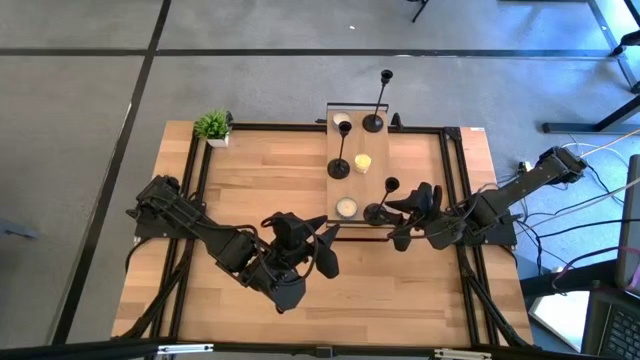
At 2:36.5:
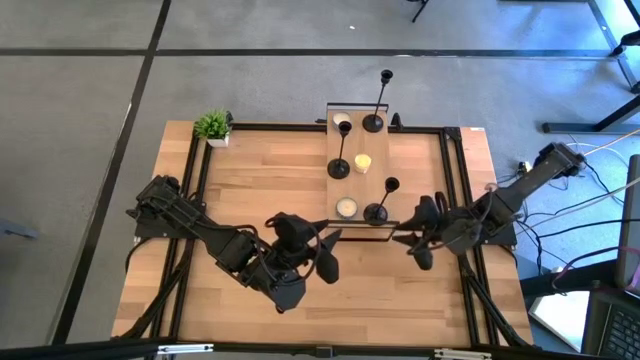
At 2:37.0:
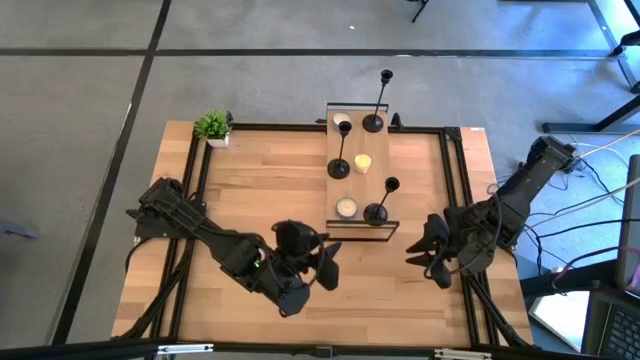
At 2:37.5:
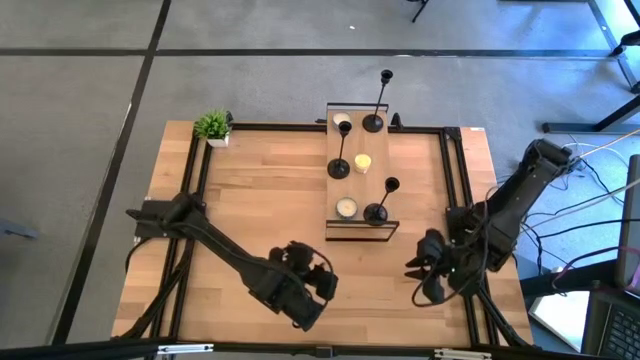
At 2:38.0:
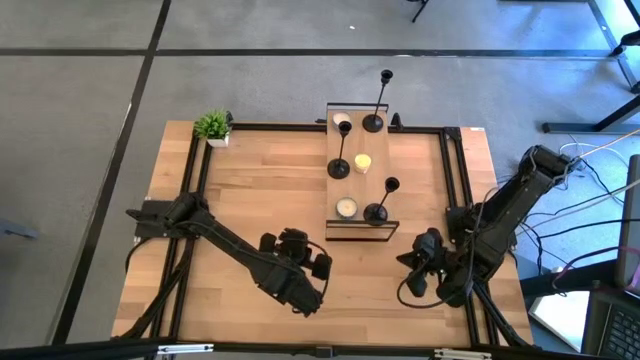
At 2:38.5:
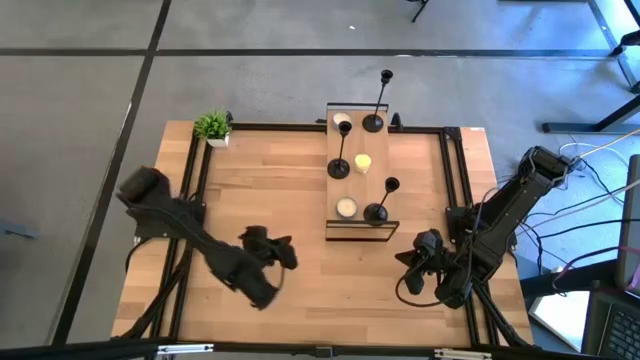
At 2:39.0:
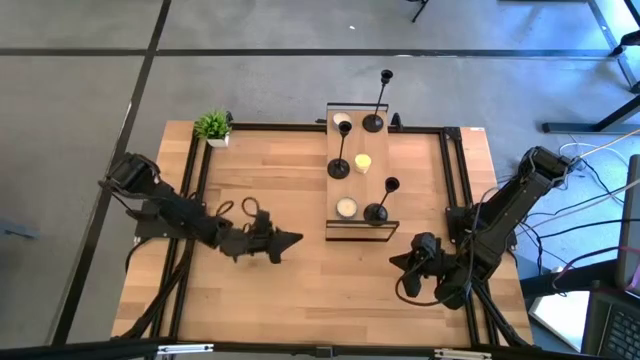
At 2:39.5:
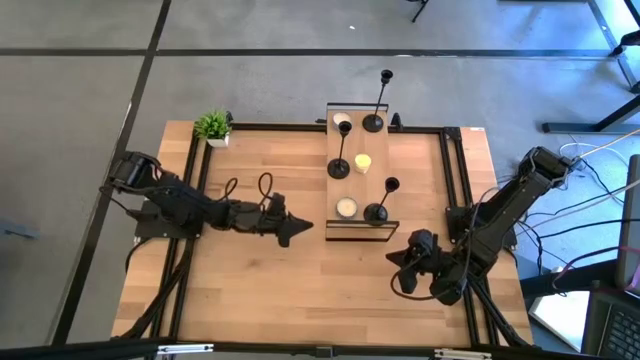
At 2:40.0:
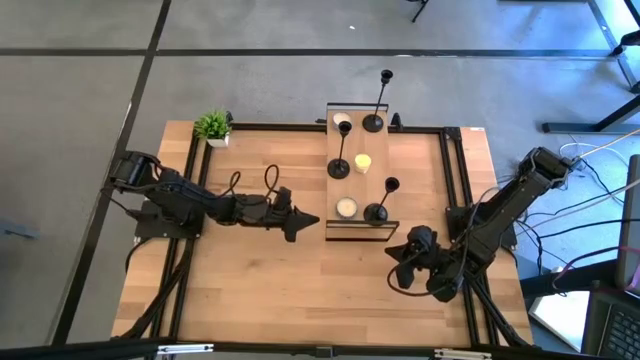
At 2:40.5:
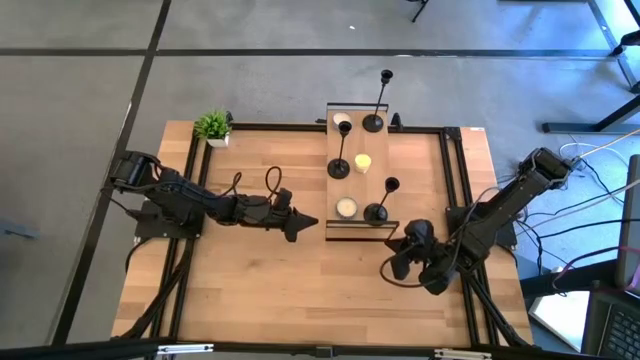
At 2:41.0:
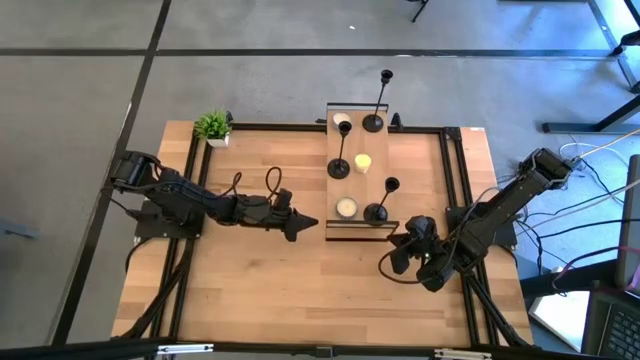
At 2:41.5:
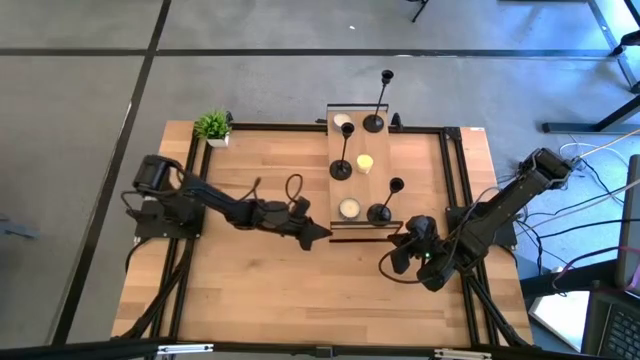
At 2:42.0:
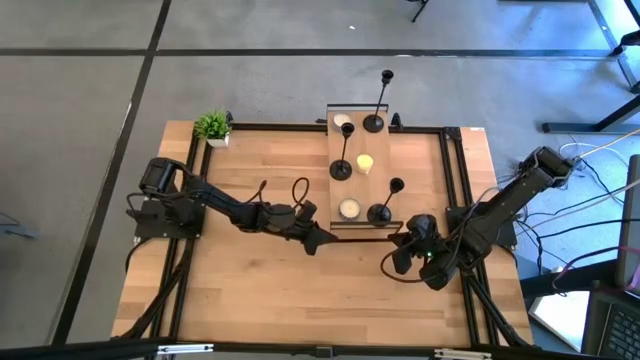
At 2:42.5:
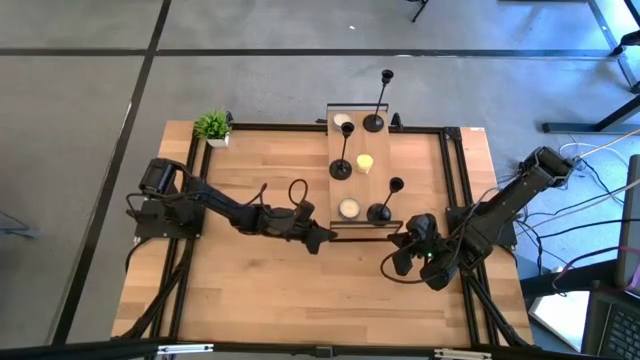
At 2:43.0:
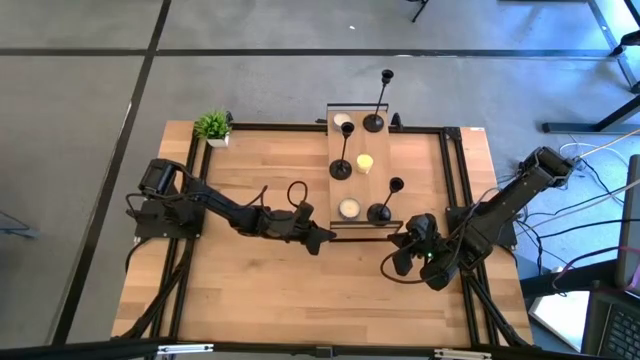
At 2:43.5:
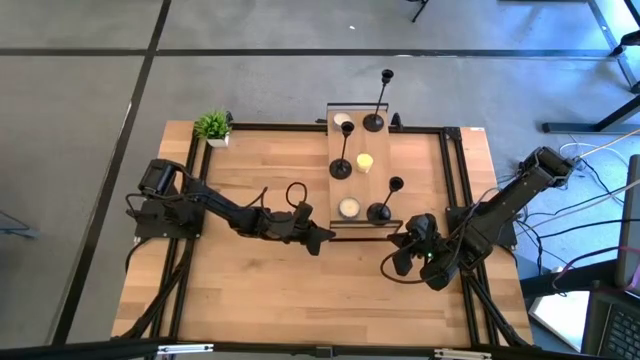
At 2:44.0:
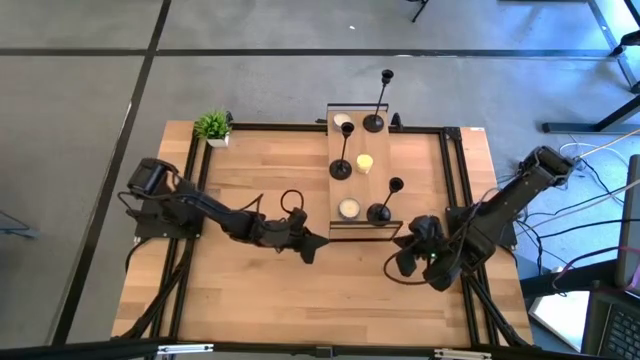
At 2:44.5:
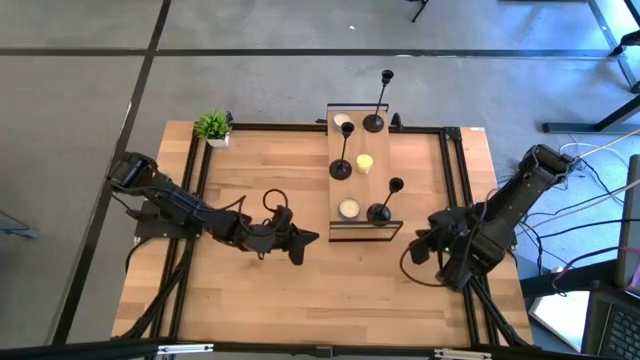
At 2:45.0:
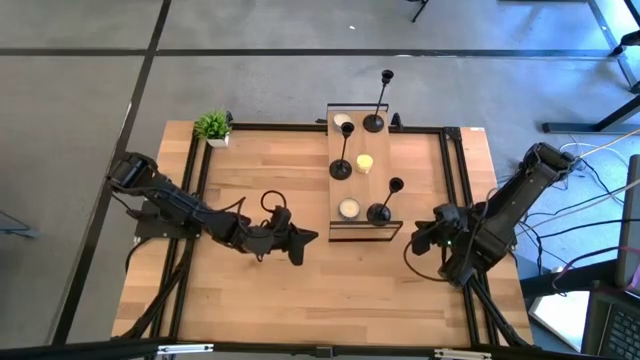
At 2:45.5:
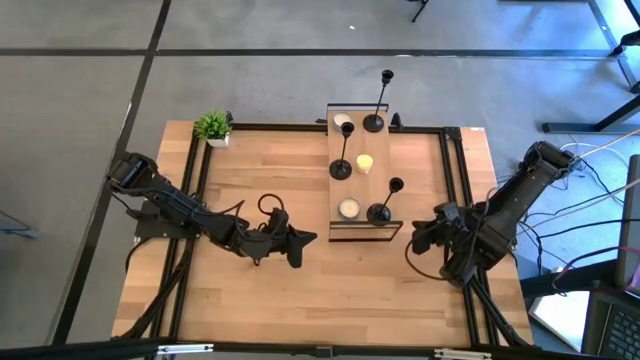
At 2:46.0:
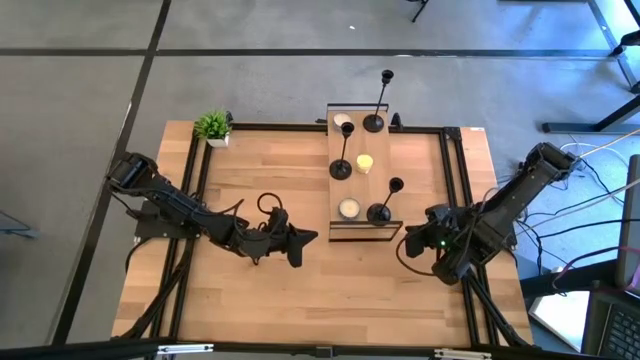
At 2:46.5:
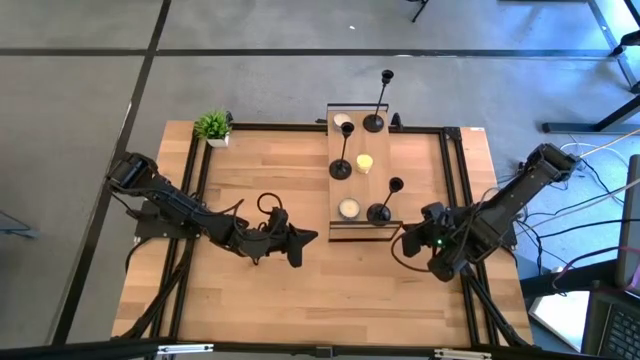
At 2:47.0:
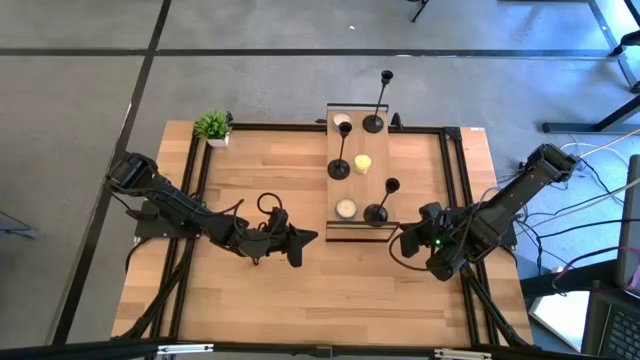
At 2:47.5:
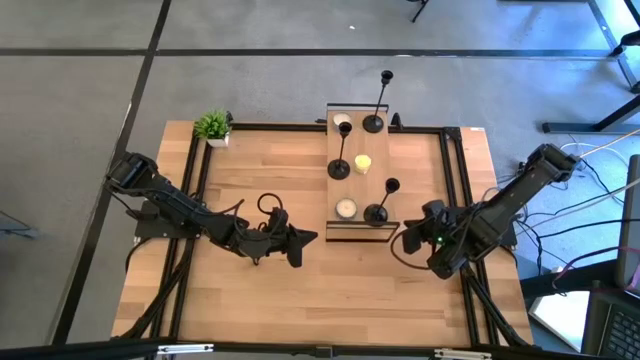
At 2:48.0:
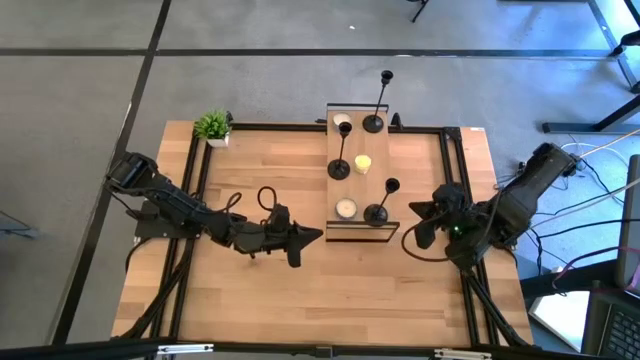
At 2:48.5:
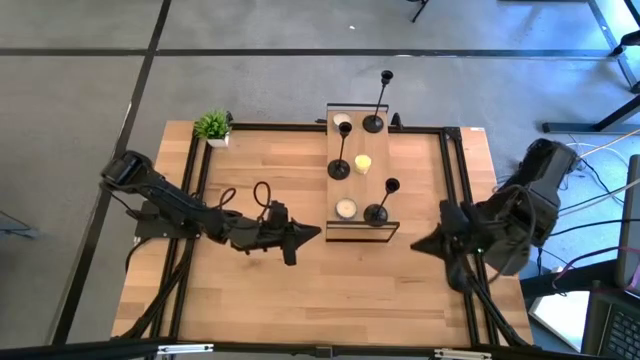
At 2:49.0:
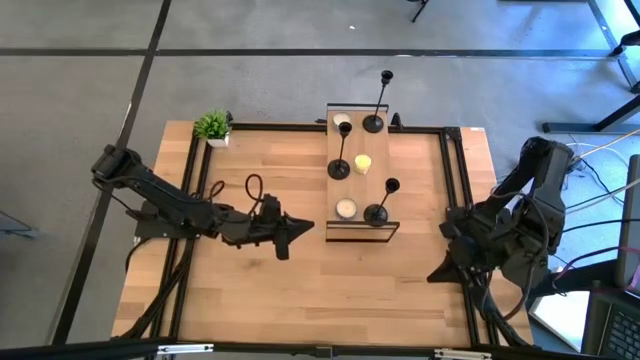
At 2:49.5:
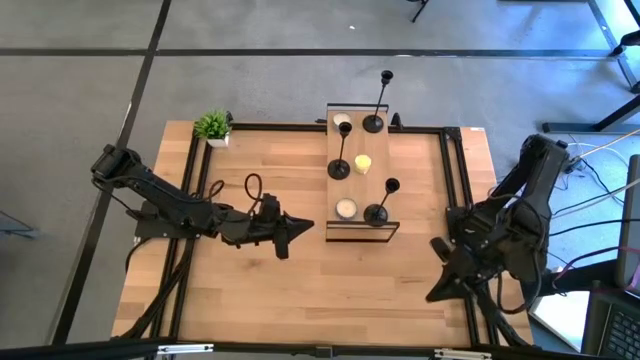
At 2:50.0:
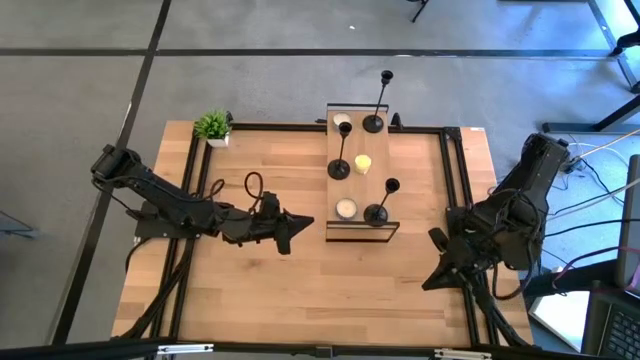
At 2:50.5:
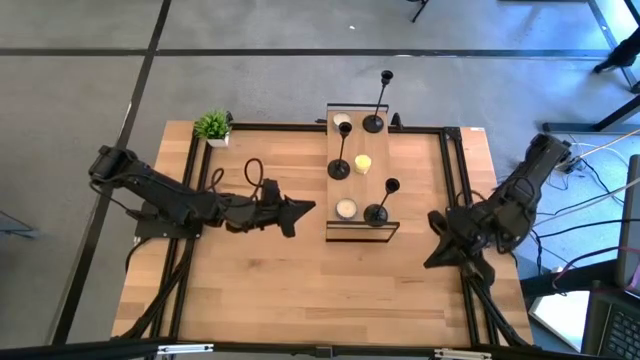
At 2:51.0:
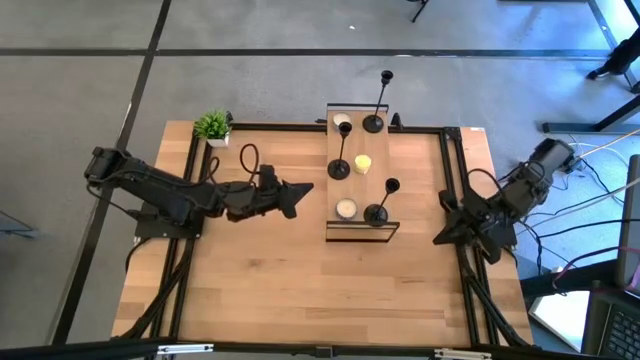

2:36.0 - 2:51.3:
Task: Pick & Place candle stick holders
Return to Home Position

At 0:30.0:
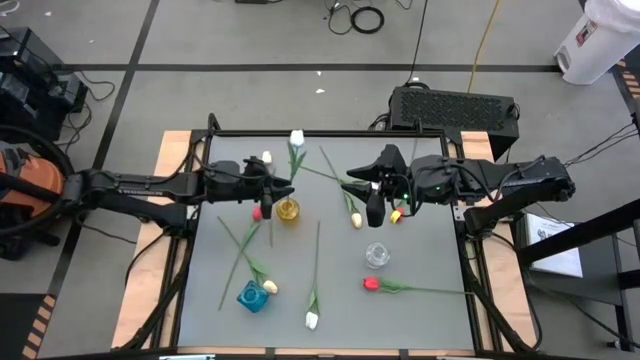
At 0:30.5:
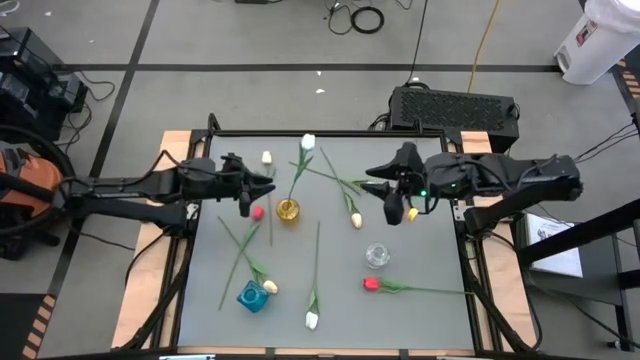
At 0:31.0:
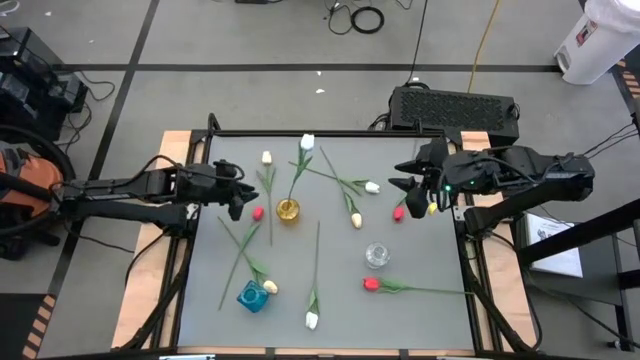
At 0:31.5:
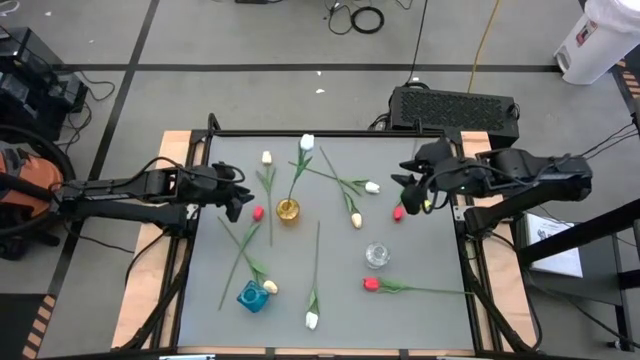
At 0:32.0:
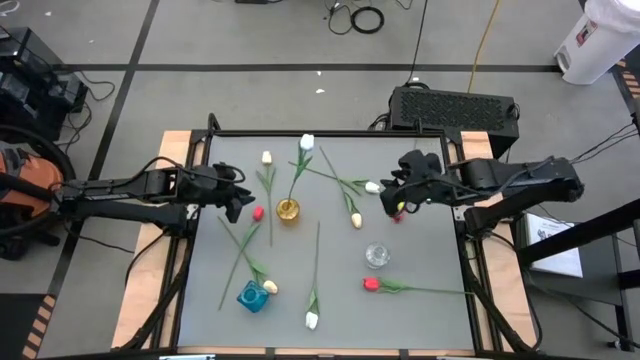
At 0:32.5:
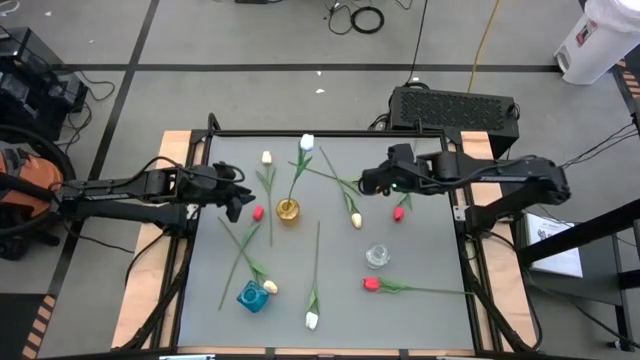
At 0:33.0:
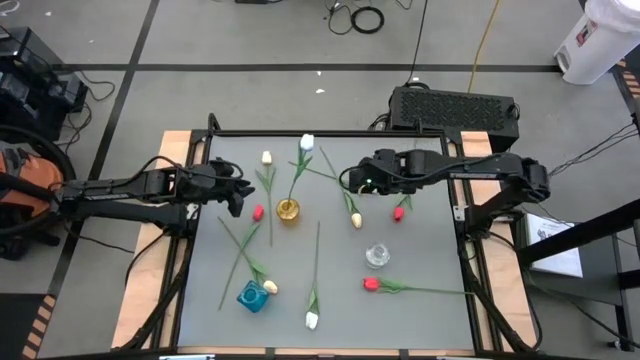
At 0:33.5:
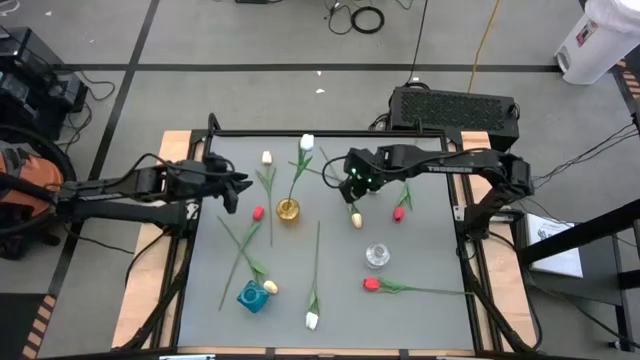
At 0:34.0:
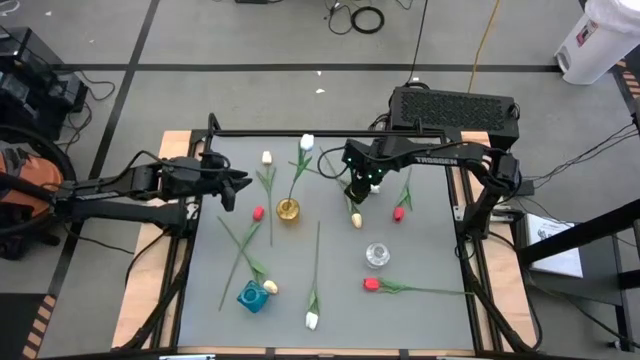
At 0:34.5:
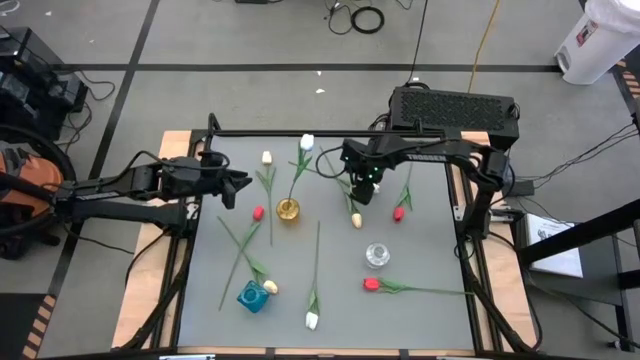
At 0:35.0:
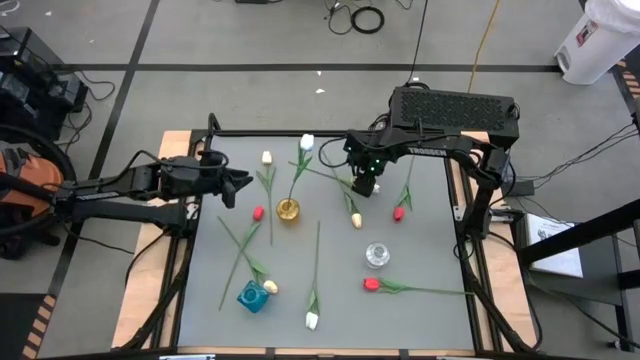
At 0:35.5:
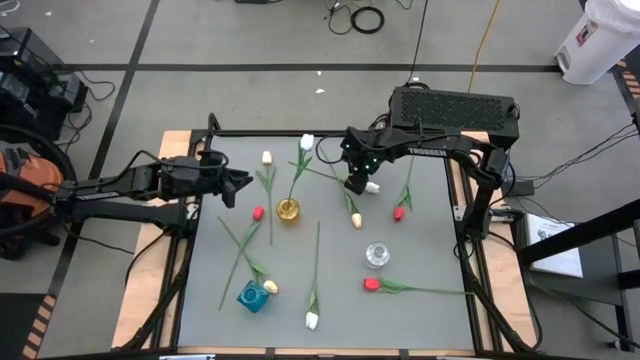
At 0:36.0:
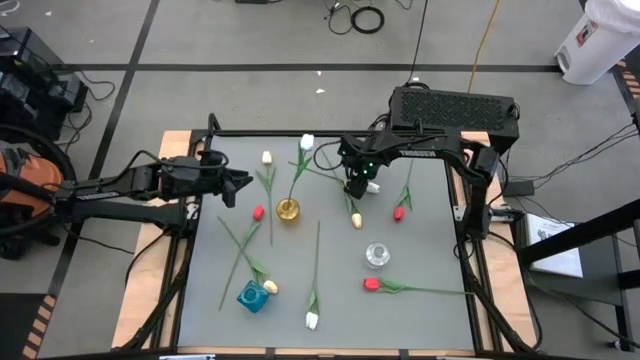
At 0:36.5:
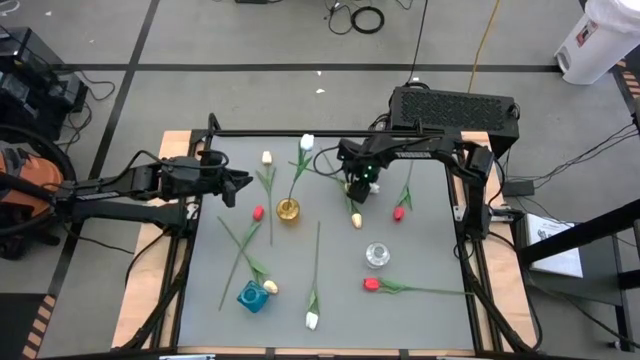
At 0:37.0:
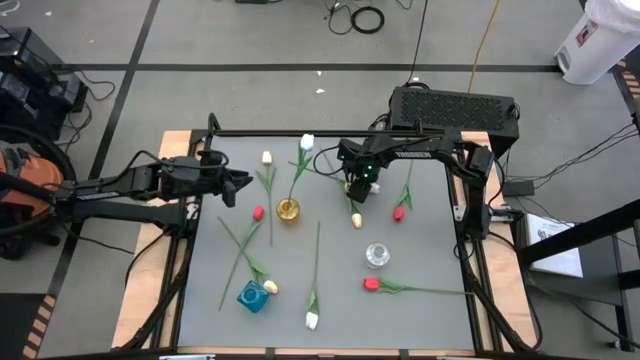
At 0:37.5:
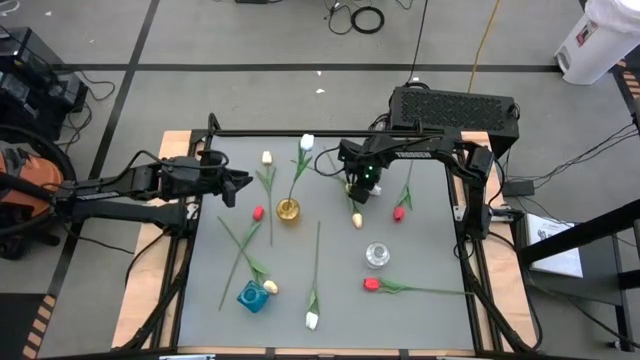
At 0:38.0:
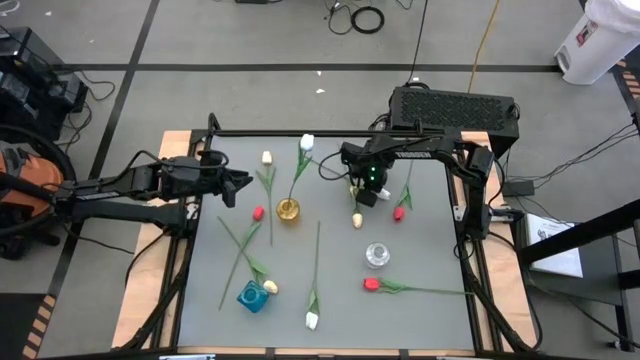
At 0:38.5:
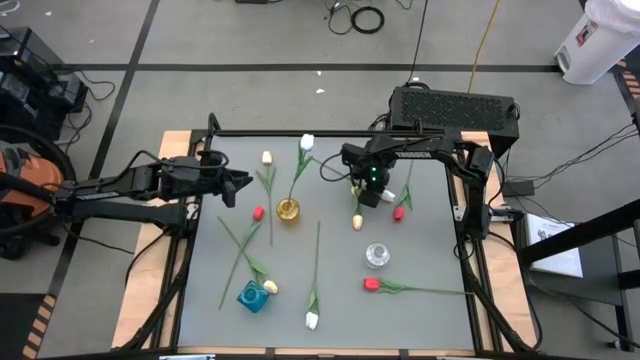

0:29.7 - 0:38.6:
Task: Sort flowers into vase by color
Put the top white tulip into the yellow vase
